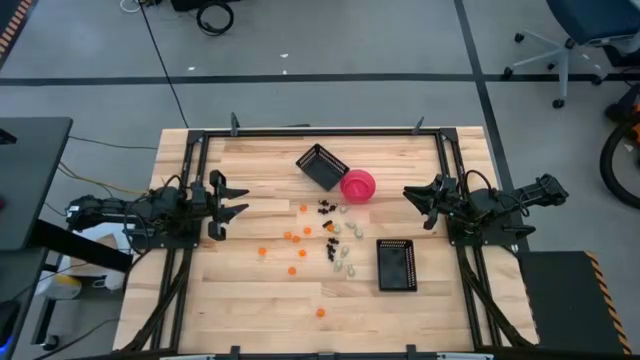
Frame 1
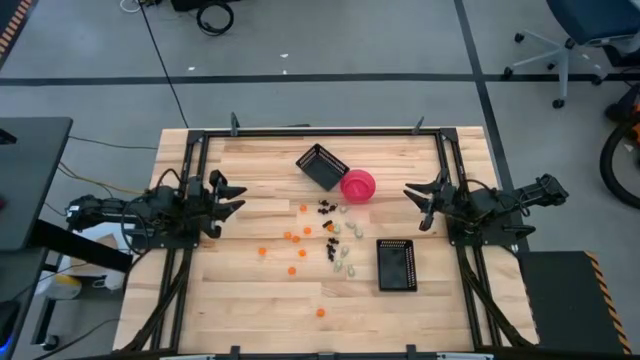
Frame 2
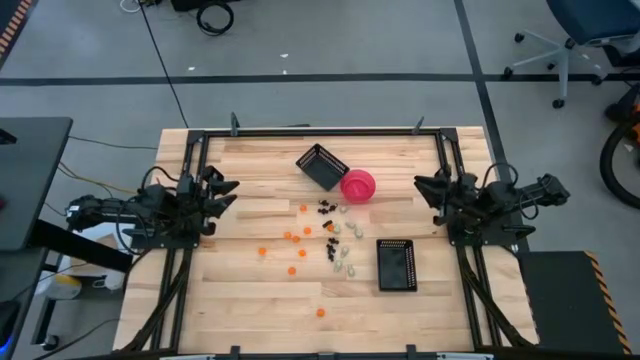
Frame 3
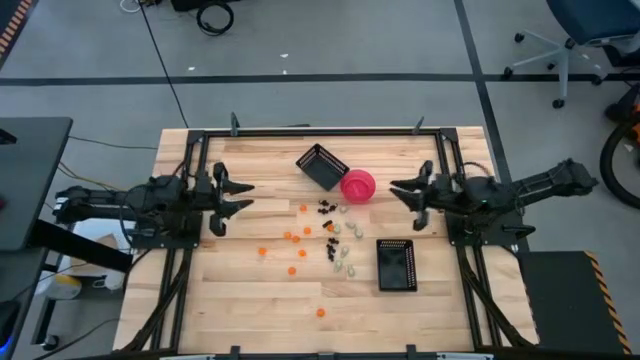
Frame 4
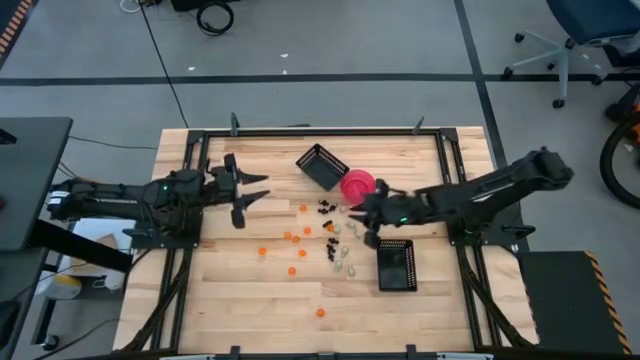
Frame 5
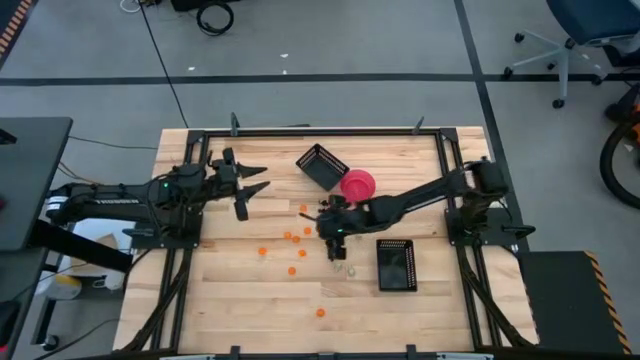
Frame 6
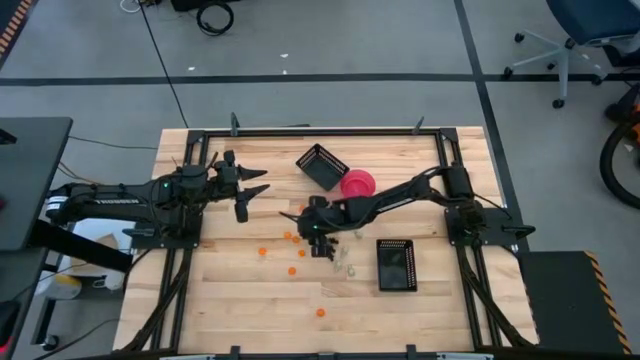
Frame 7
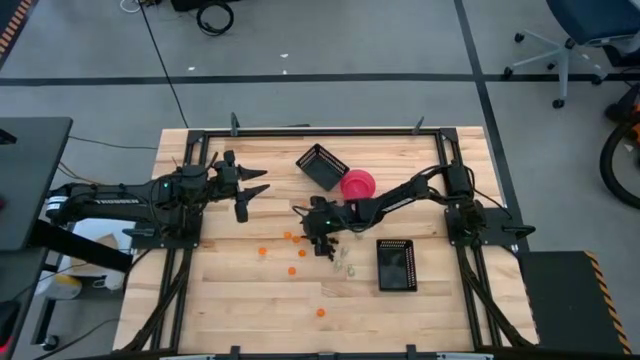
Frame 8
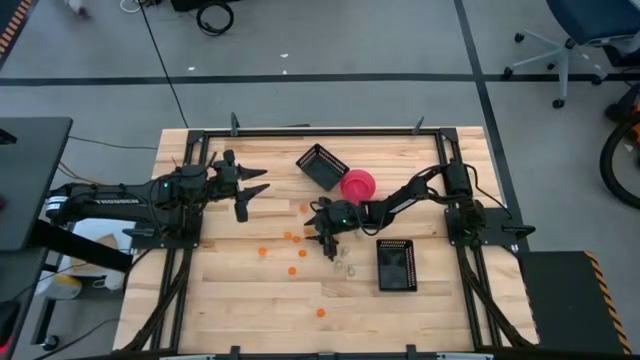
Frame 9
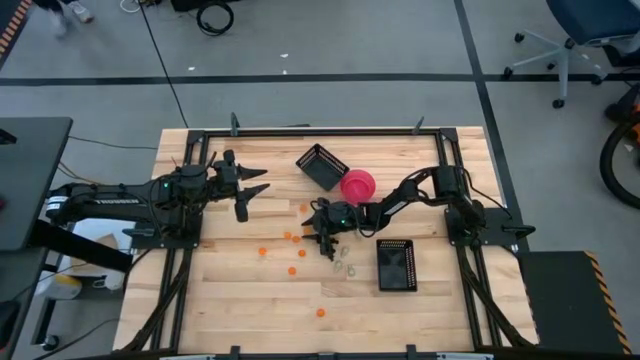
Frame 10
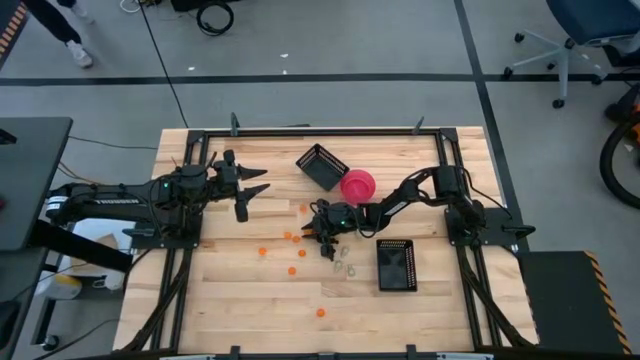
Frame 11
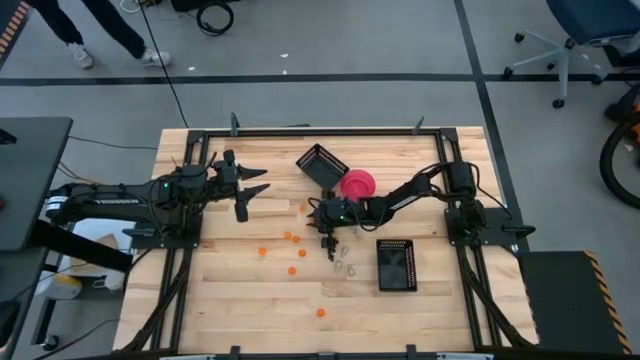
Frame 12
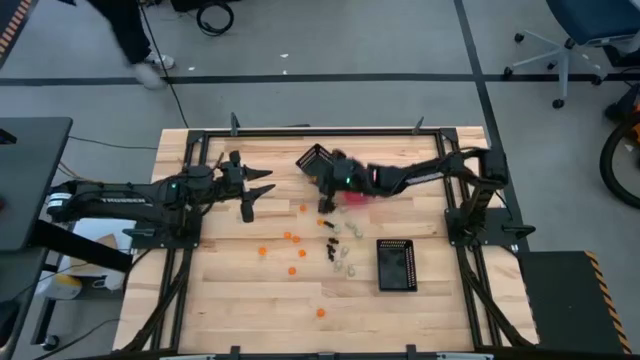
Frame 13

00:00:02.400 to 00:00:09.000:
Task: Sort Halloween decoration
Put the orange pumpkin toy into the top black bin

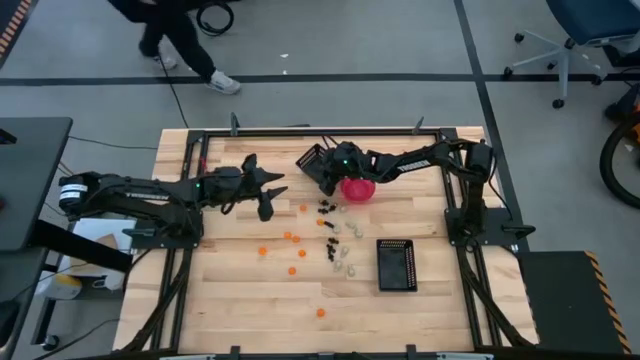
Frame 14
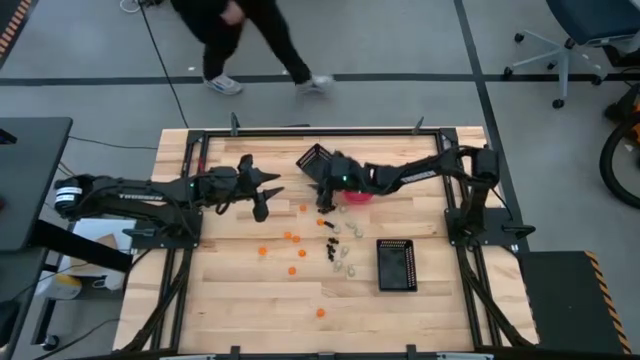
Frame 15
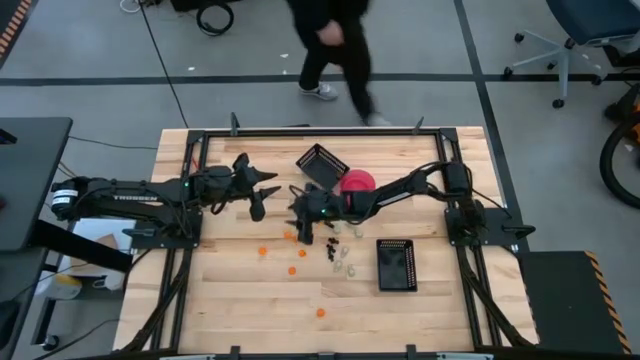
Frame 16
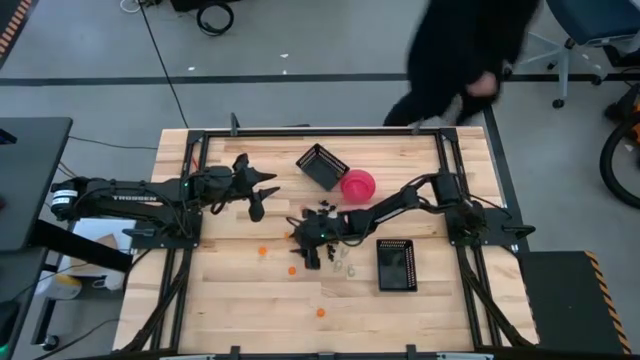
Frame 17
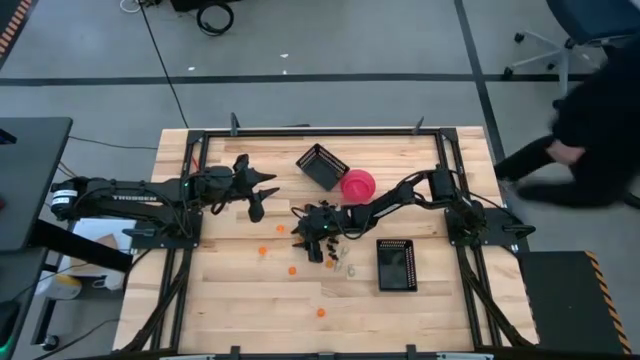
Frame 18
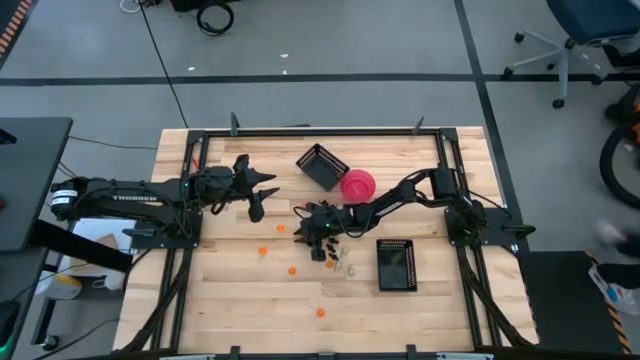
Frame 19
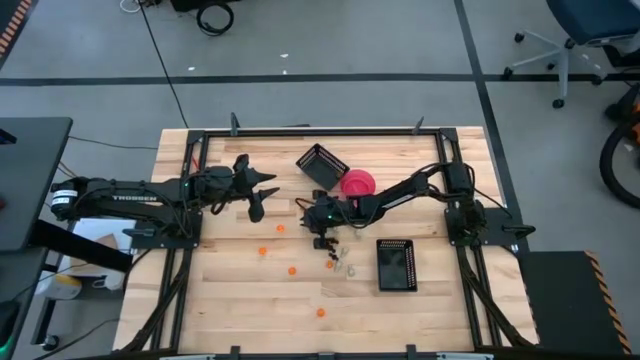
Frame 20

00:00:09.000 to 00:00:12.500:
Put the orange pumpkin toy into the top black bin

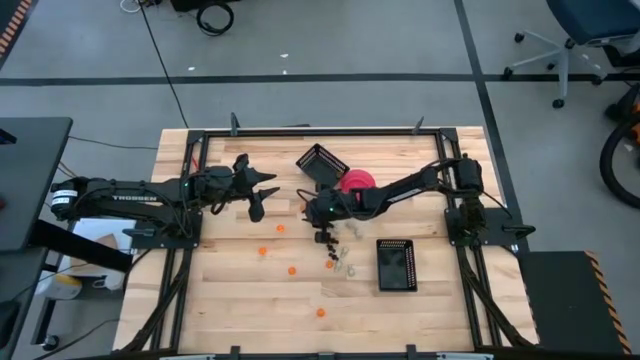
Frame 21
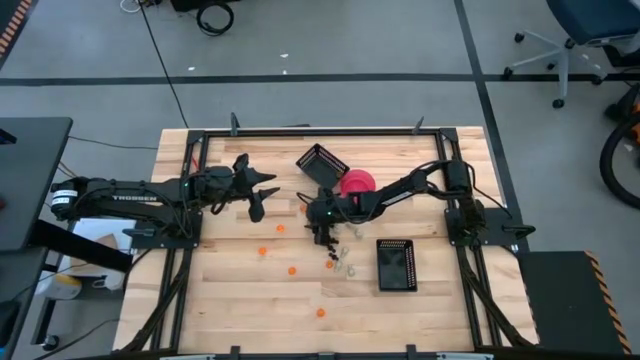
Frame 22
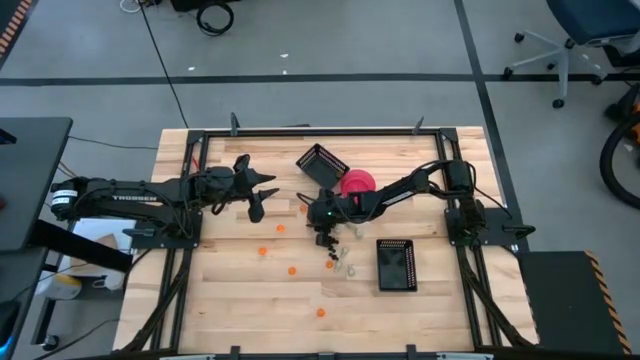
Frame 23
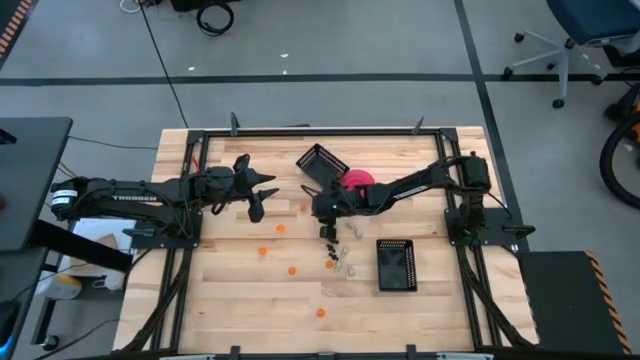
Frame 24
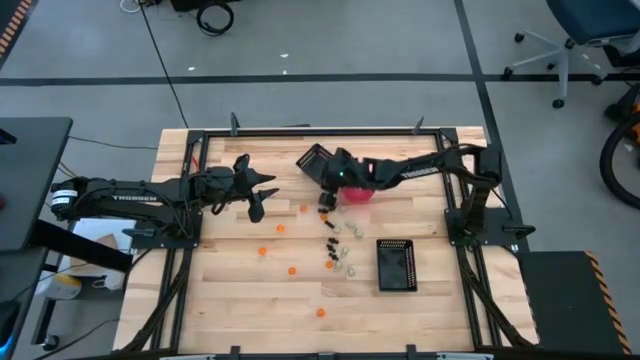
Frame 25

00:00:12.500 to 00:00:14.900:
Put the orange pumpkin toy into the top black bin

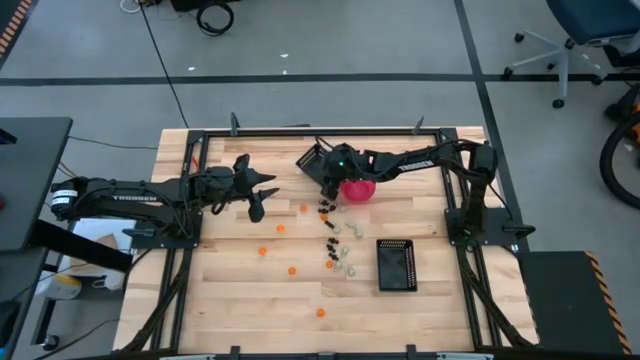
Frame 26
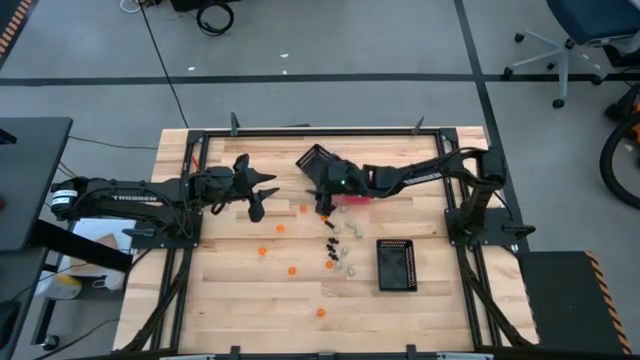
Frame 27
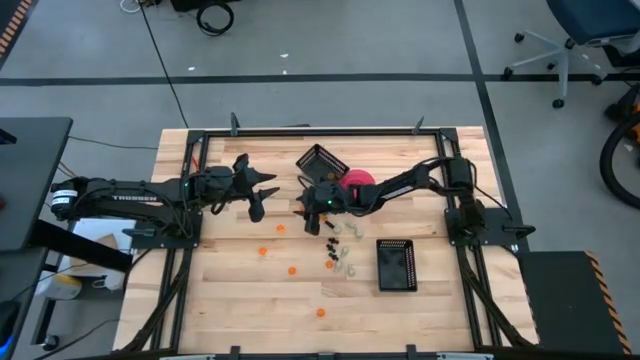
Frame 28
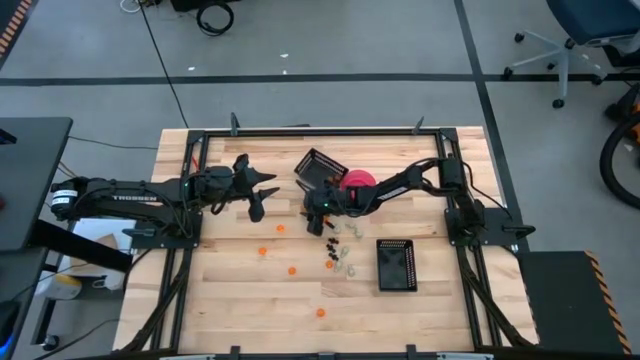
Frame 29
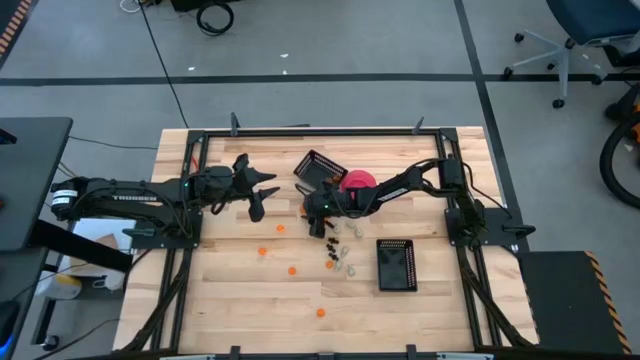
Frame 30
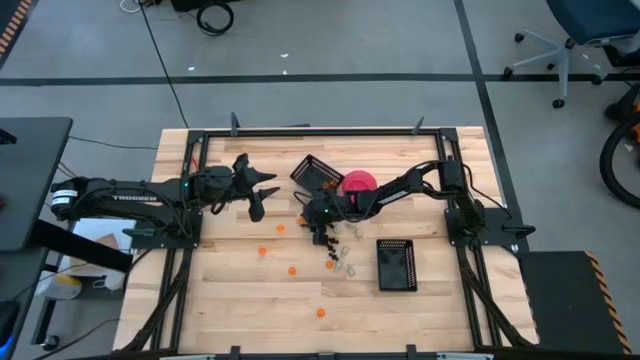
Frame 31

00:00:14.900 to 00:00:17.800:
Put the orange pumpkin toy into the top black bin

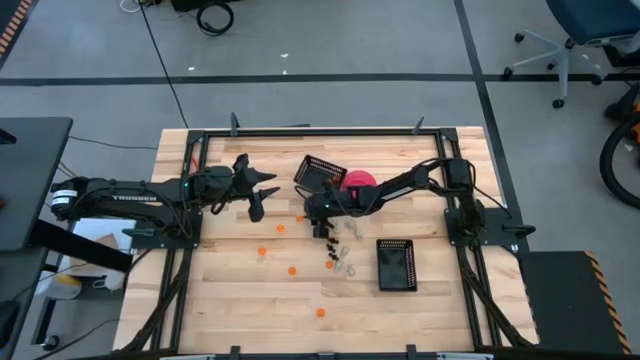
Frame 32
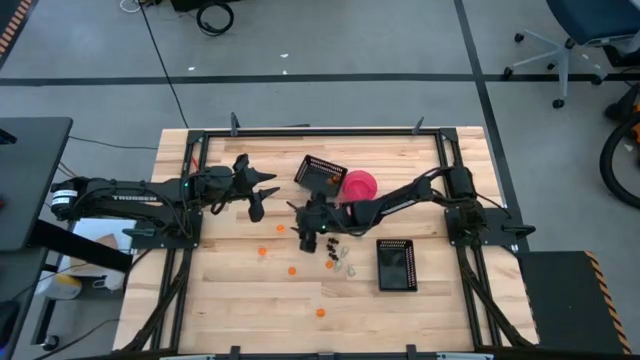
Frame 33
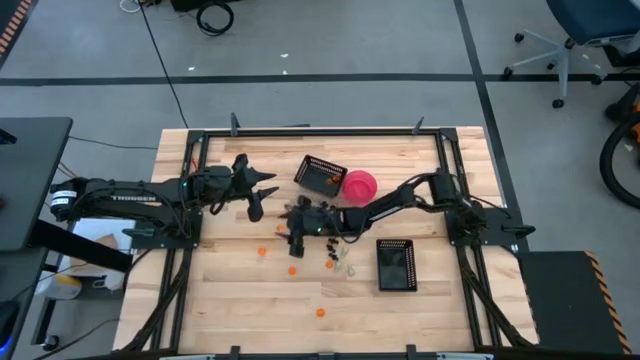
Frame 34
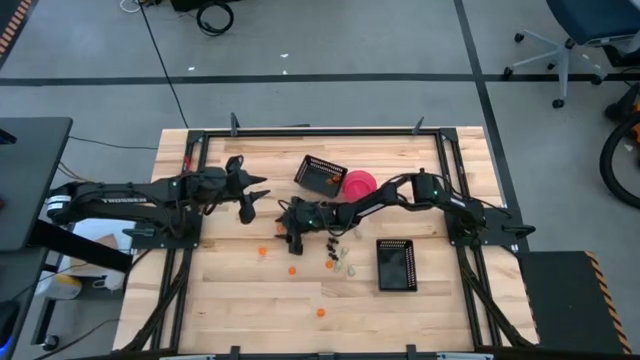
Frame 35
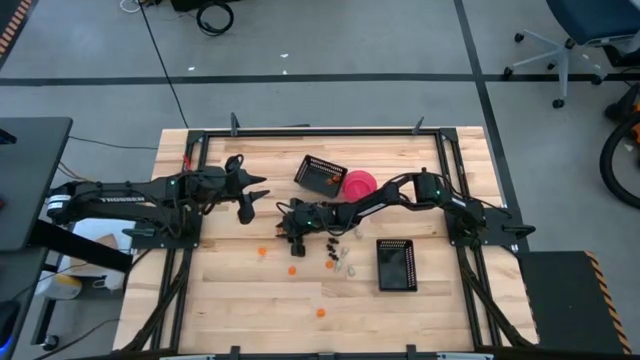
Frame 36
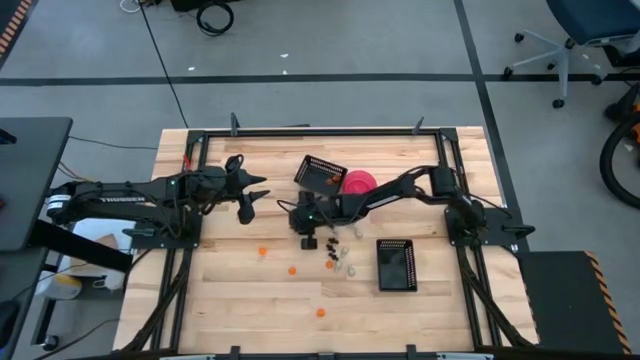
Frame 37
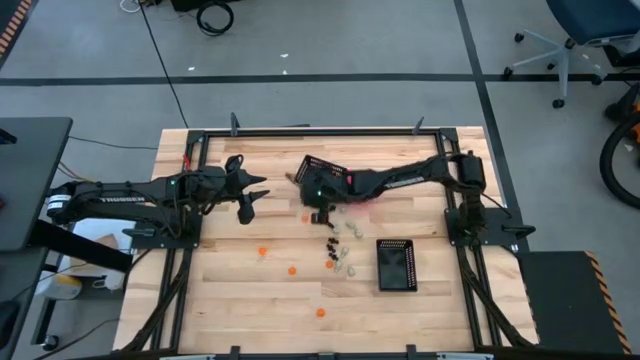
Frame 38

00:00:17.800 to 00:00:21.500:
Put the orange pumpkin toy into the top black bin

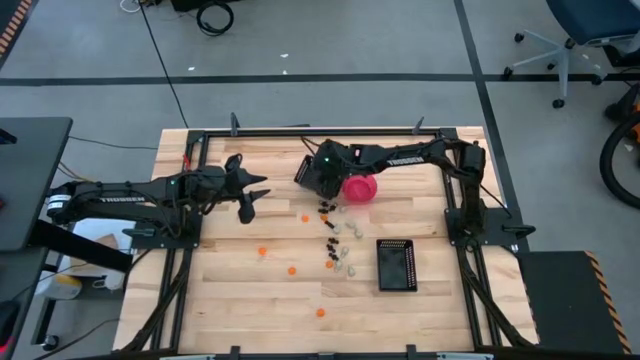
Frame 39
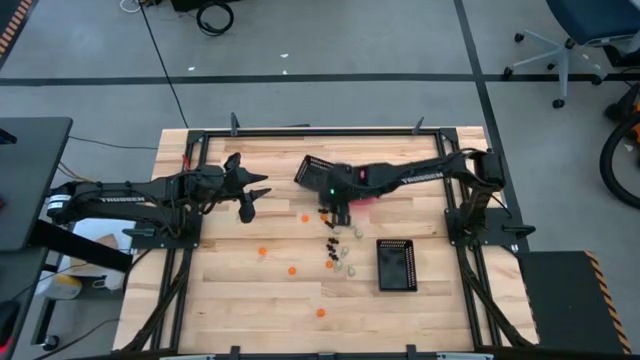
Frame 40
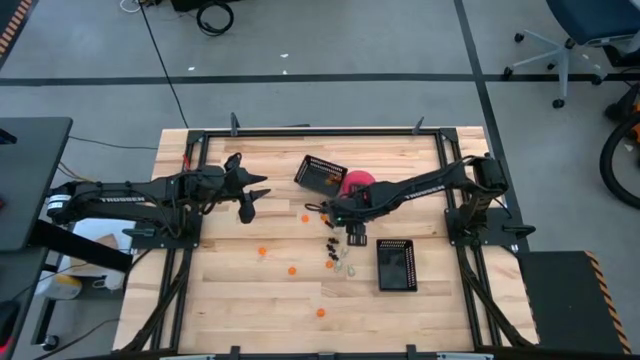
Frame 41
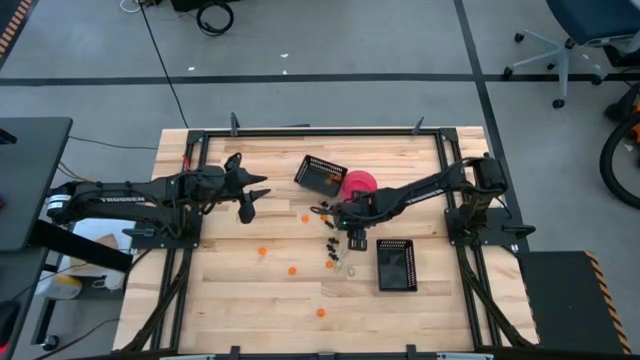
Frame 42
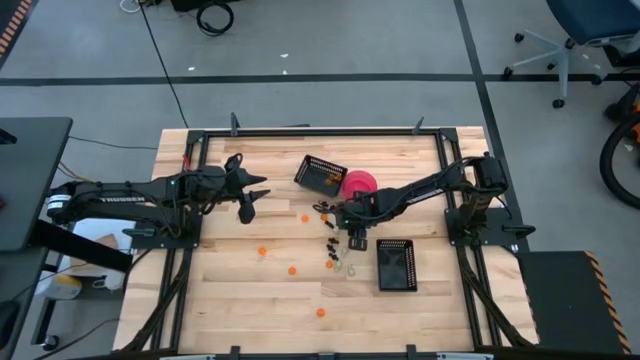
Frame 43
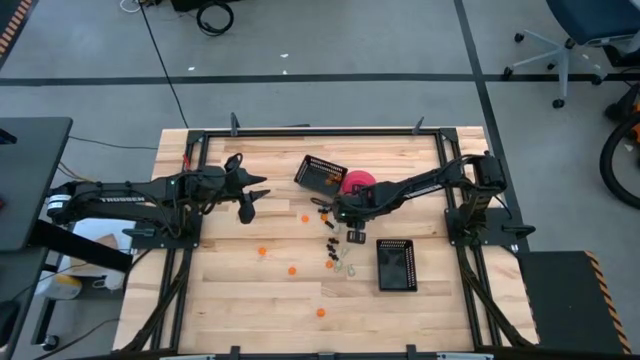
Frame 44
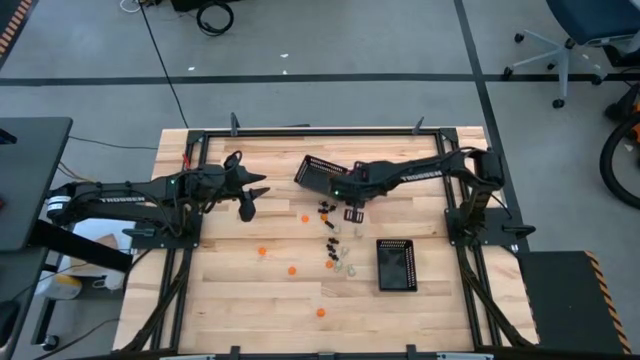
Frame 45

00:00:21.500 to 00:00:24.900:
Put the white skull toy into the pink bowl
